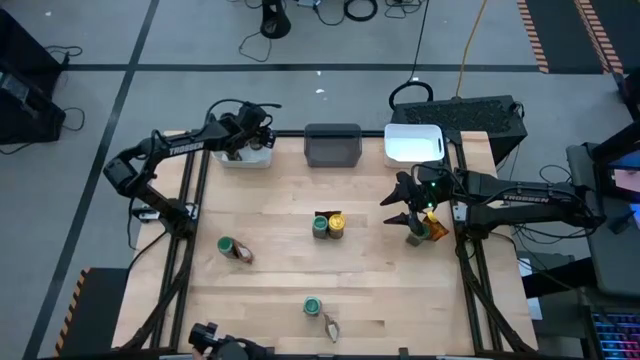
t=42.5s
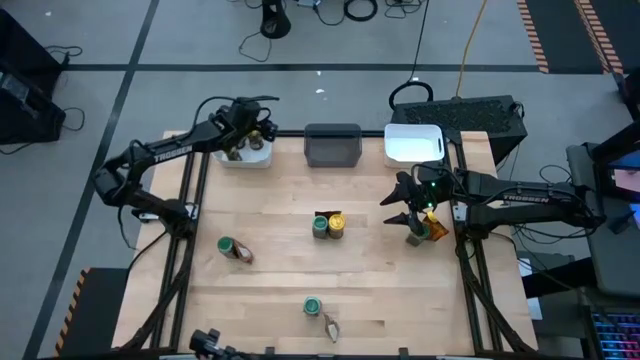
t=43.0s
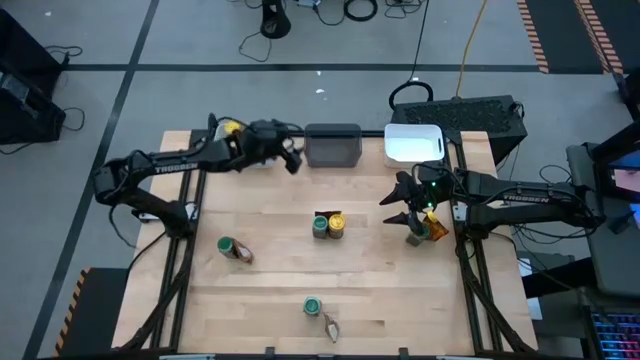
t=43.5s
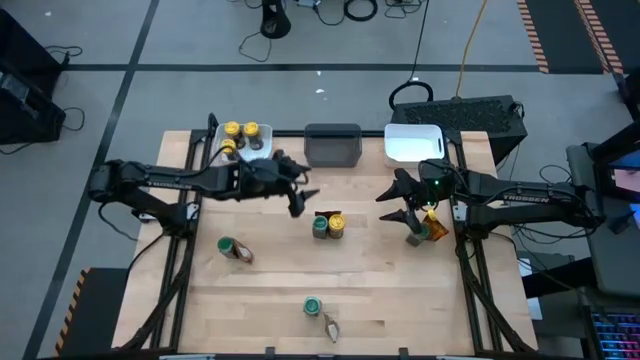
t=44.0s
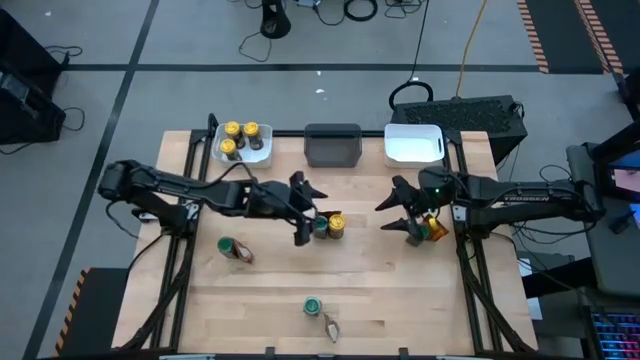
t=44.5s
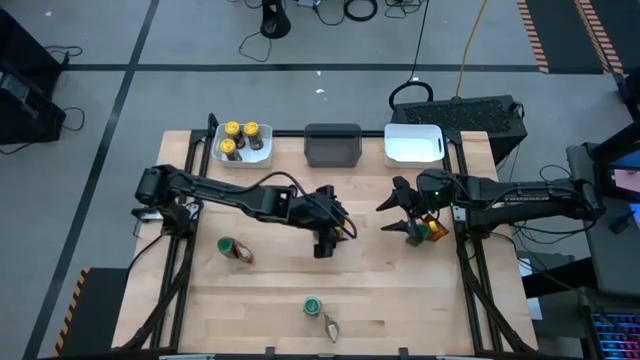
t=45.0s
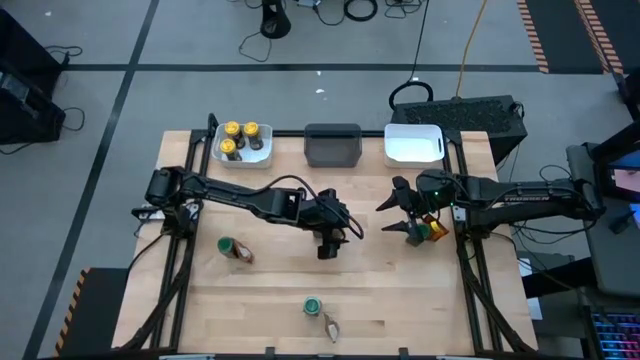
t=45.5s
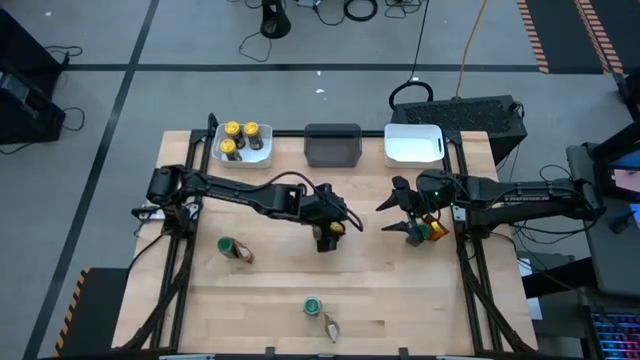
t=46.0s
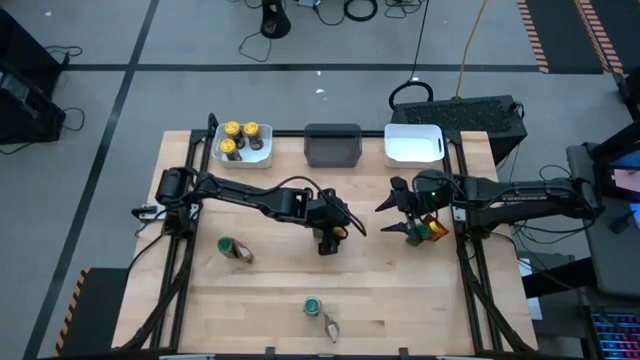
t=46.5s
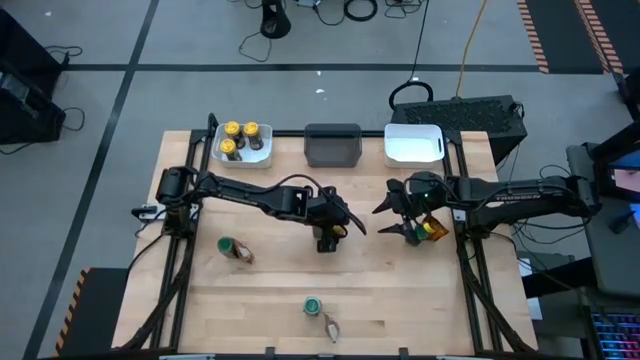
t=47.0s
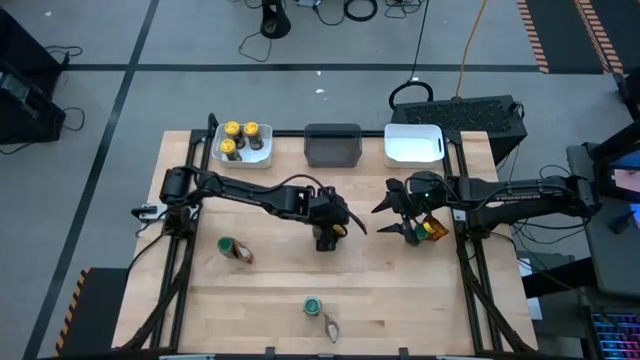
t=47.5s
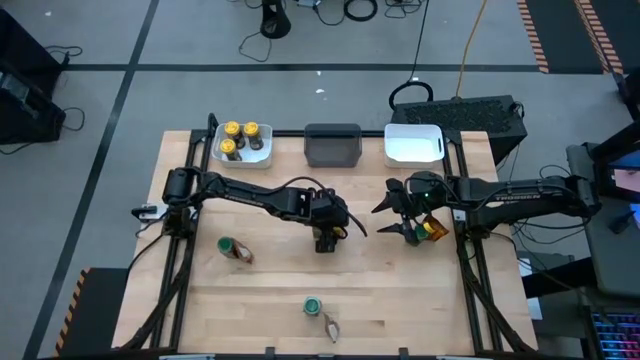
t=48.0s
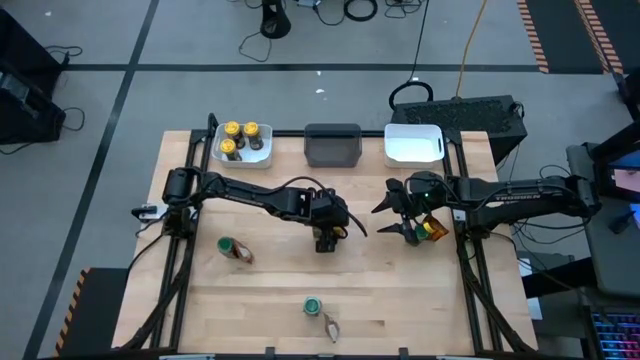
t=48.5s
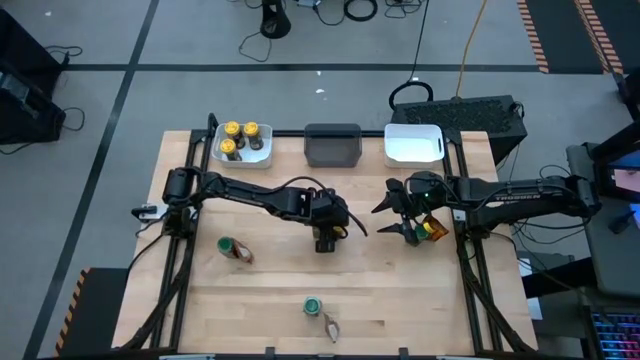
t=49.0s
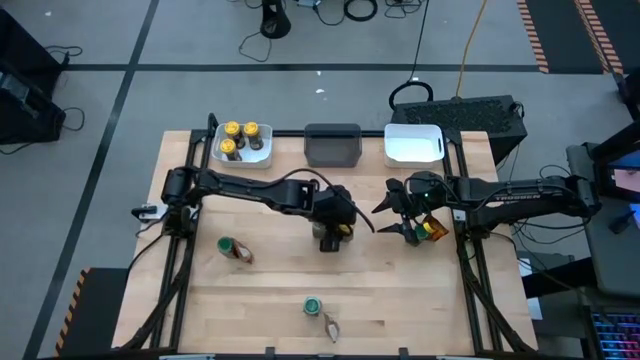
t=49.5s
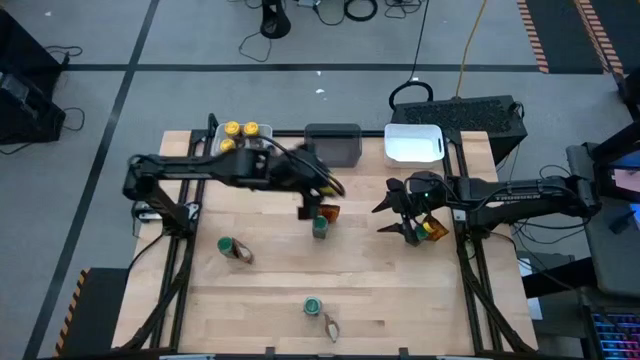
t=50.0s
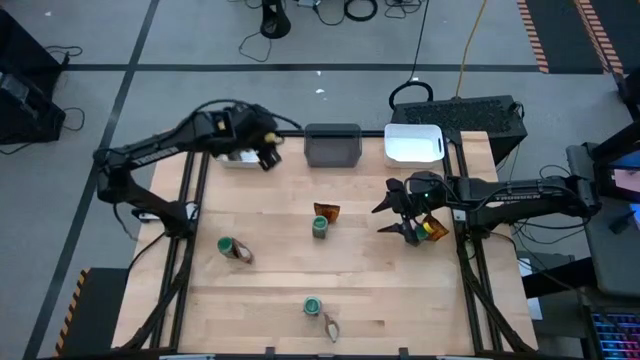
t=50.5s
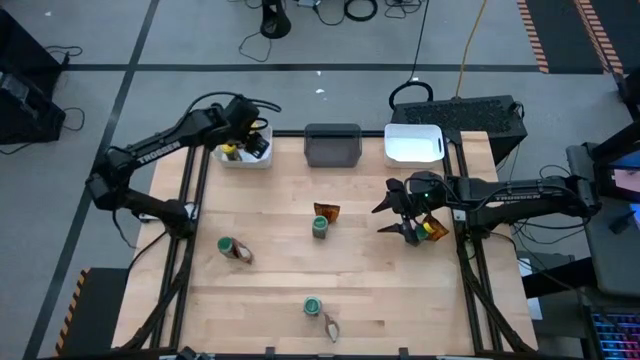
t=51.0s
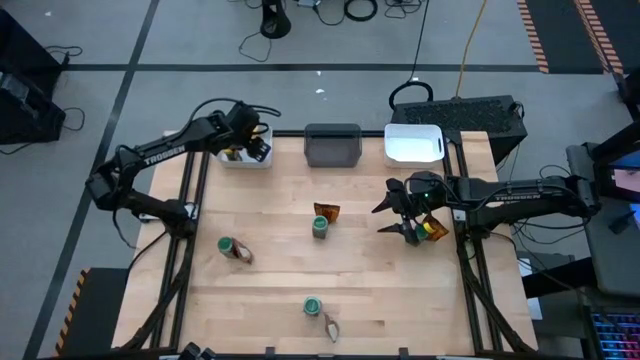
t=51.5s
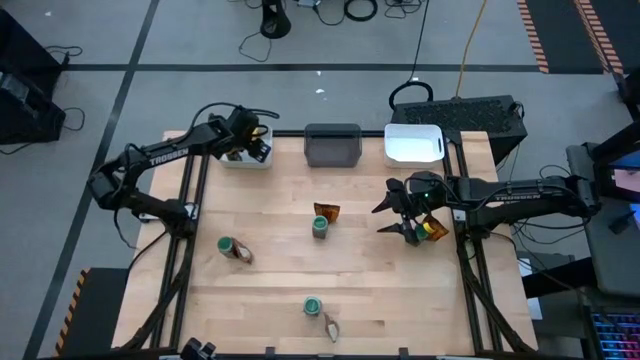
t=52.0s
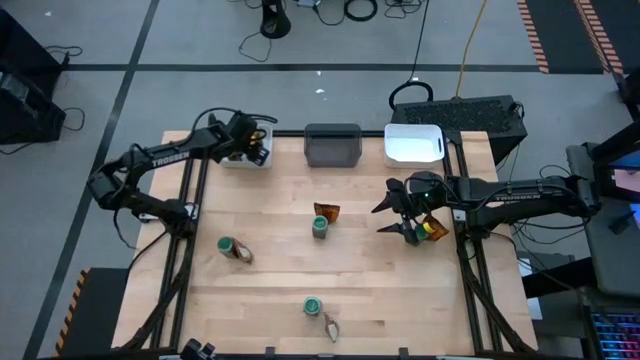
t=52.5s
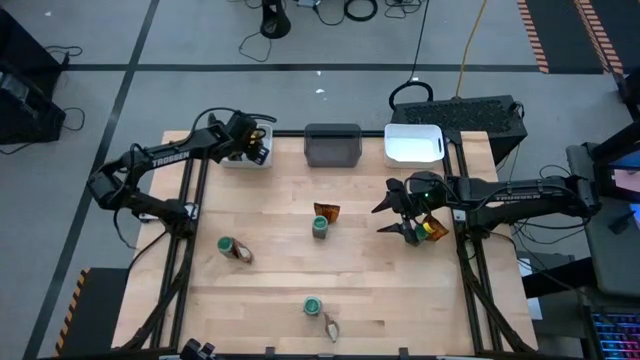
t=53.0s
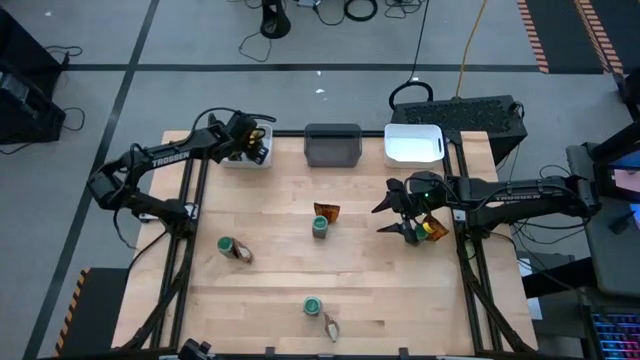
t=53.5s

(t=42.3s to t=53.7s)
Task: Sort spices by type
Put the yellow seasoning bottle into the left white bin

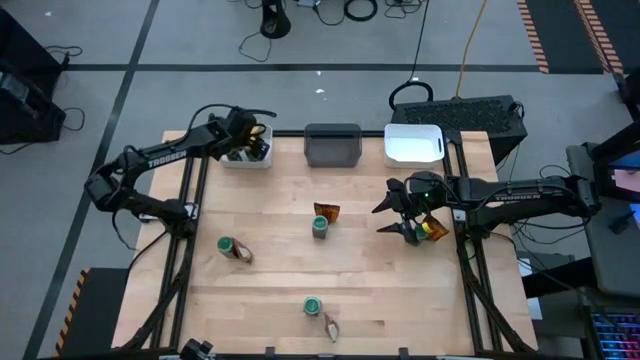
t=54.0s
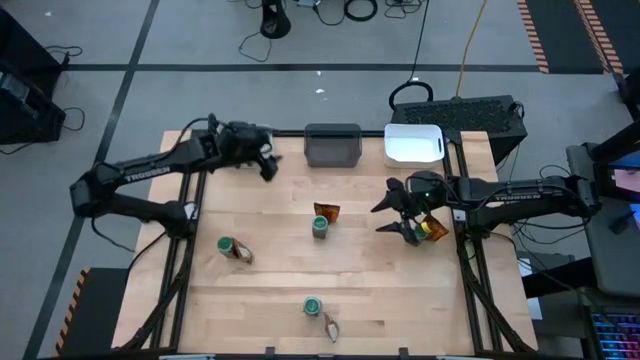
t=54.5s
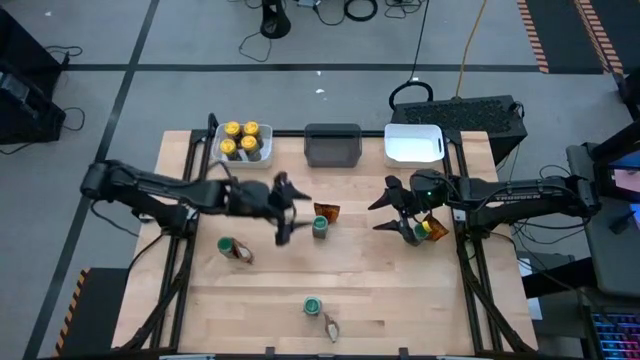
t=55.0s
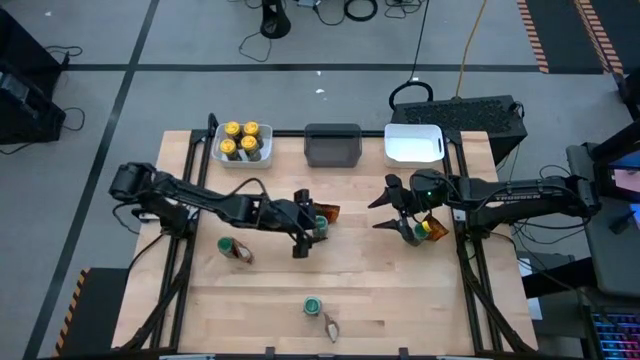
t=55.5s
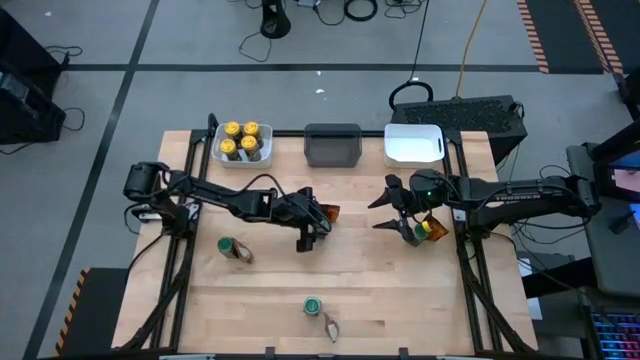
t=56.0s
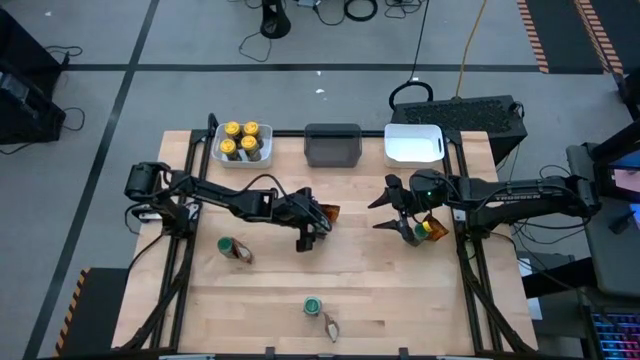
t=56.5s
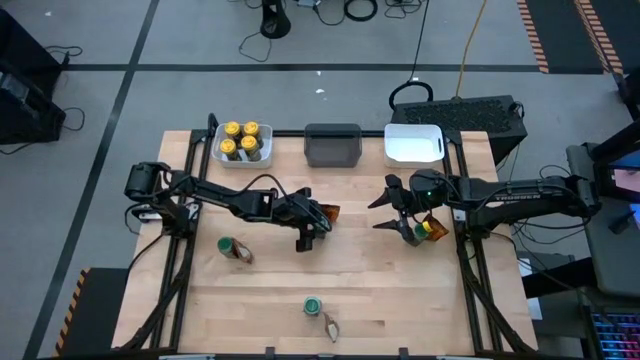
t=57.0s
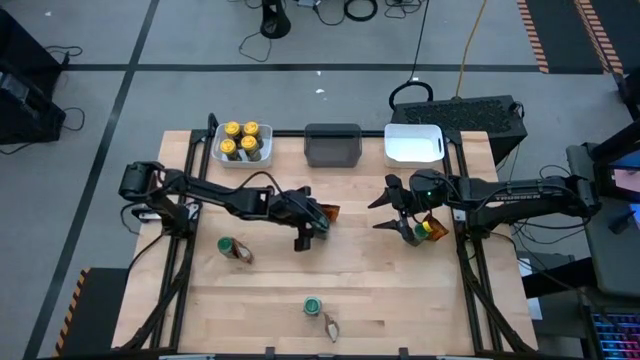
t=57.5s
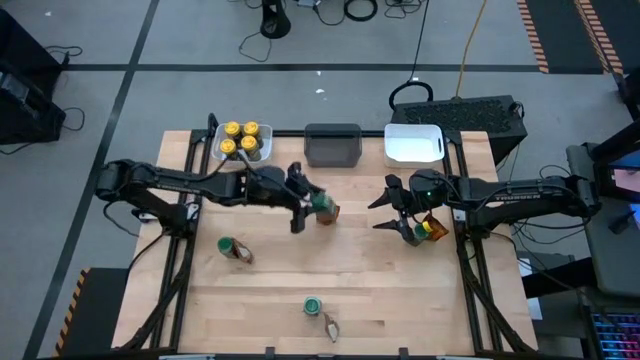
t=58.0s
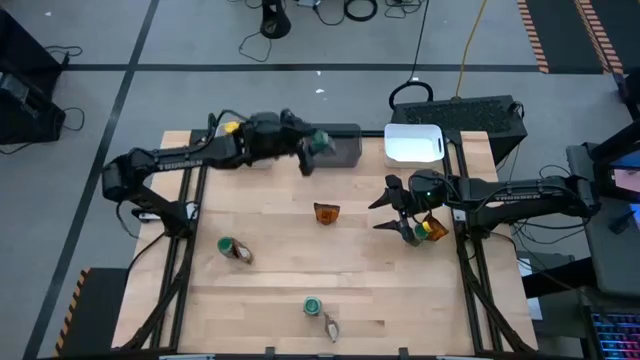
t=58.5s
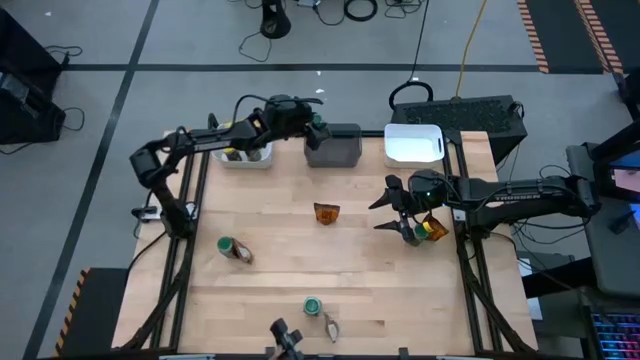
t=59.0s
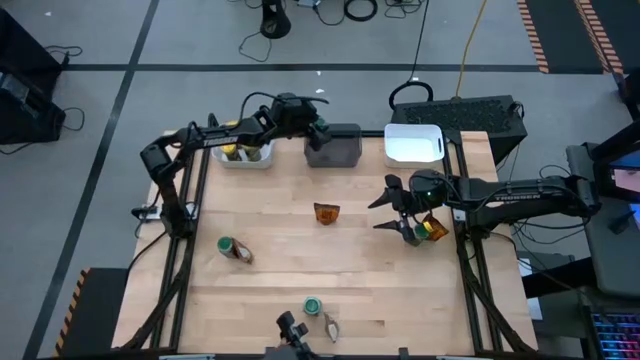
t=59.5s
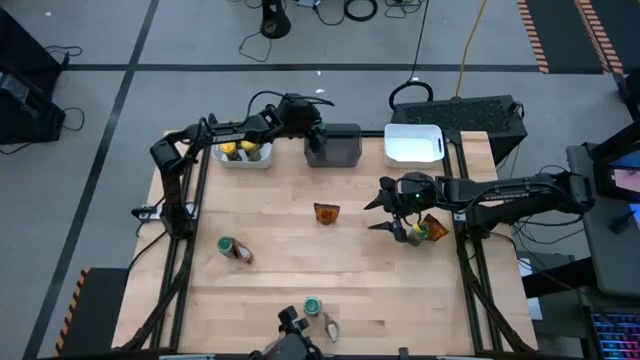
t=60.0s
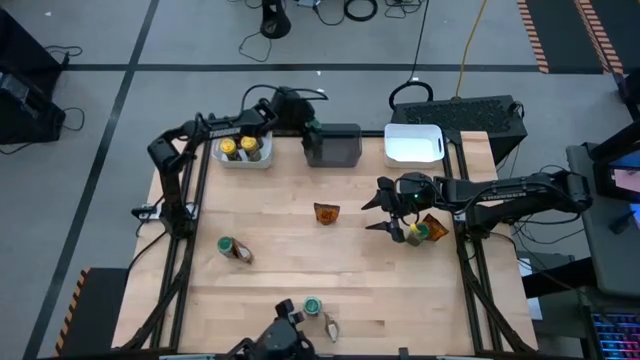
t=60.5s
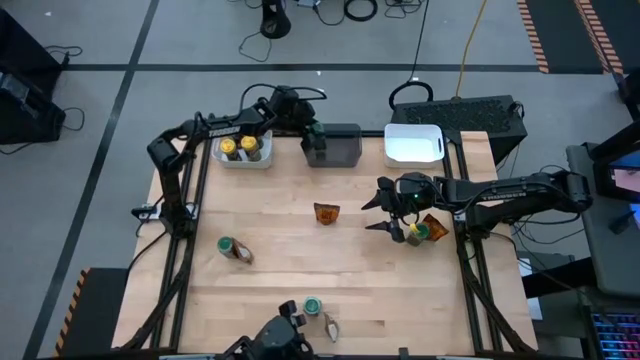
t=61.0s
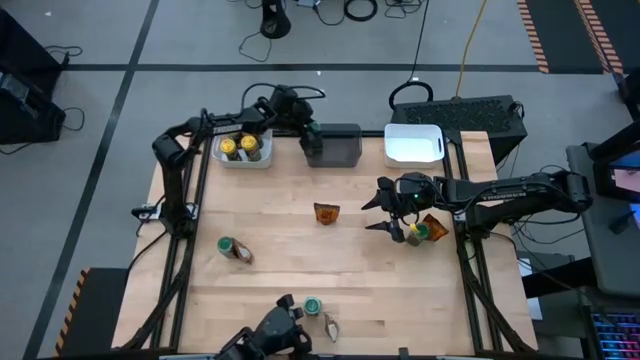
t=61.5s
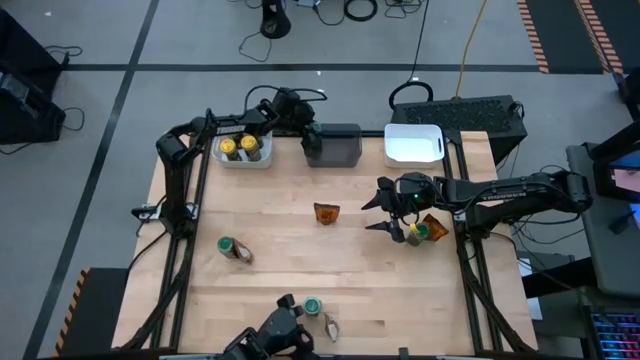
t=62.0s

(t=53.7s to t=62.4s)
Put the top center green seasoning bottle into the black bin

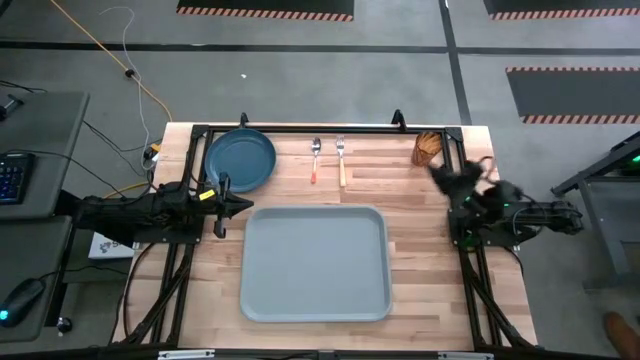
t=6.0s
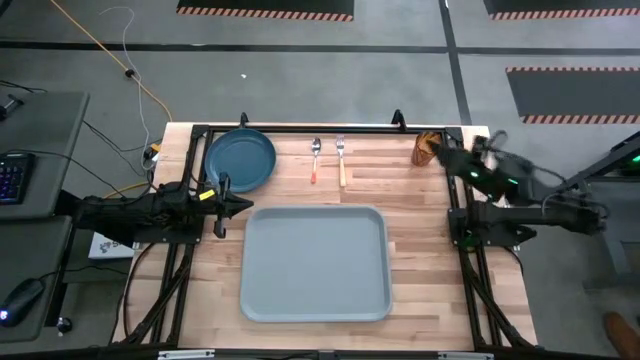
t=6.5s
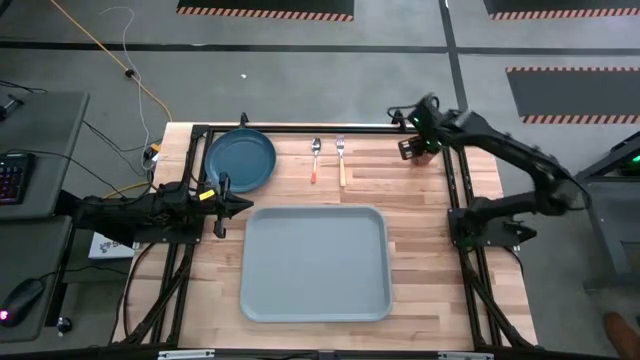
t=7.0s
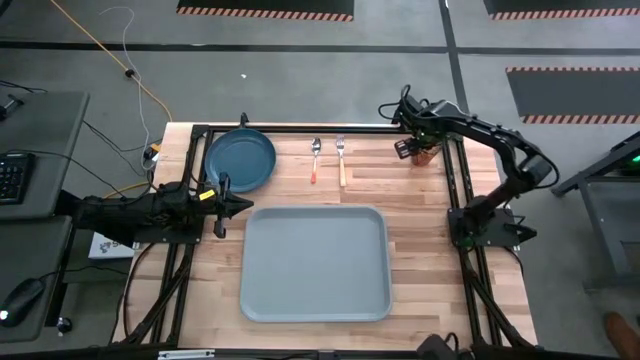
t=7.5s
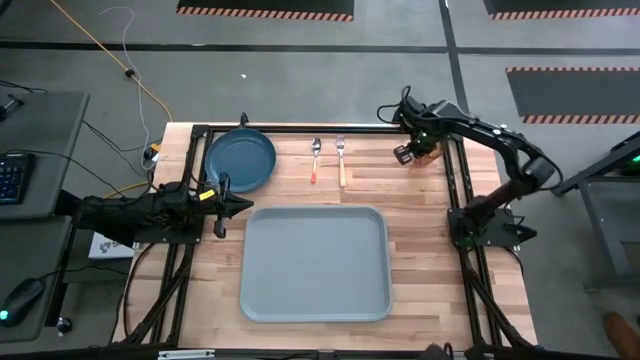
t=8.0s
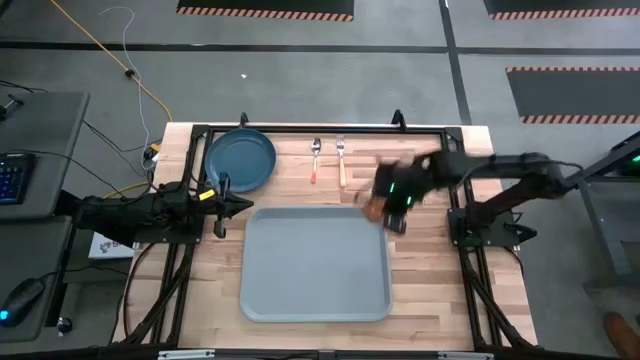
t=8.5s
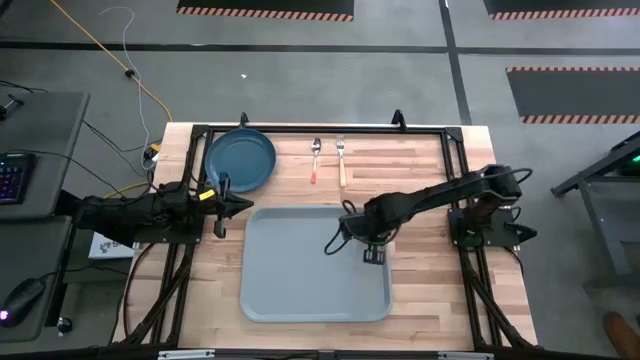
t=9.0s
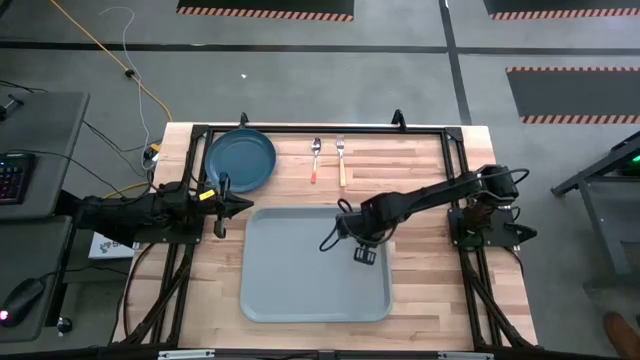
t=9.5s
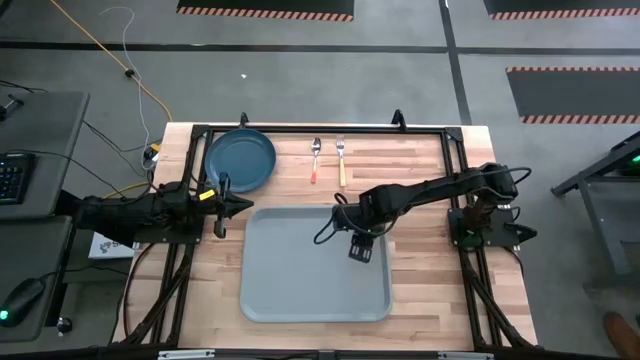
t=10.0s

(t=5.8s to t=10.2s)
Task: Pick and place plate/cup/fork/spoon on tray
Put the brown glass on the gray serving tray
